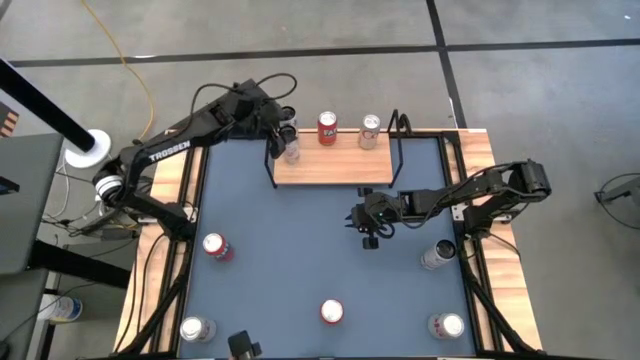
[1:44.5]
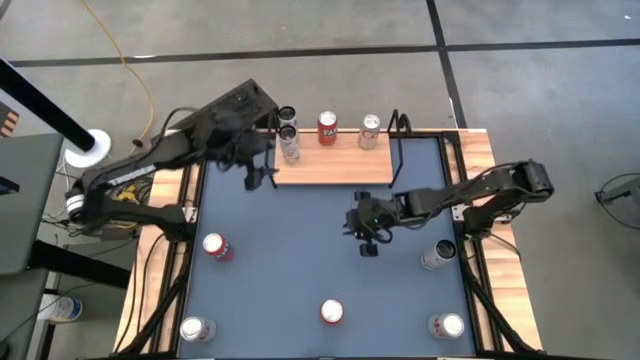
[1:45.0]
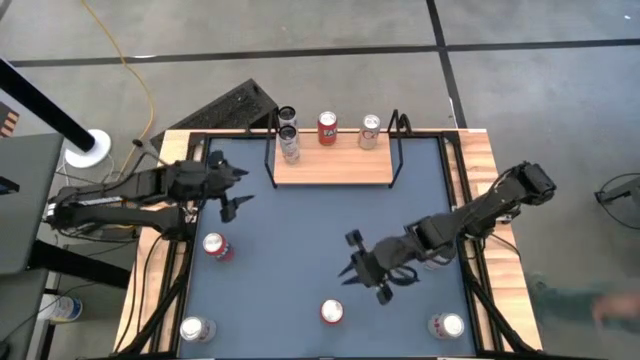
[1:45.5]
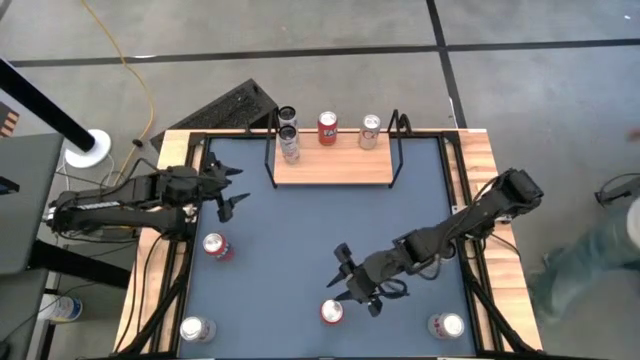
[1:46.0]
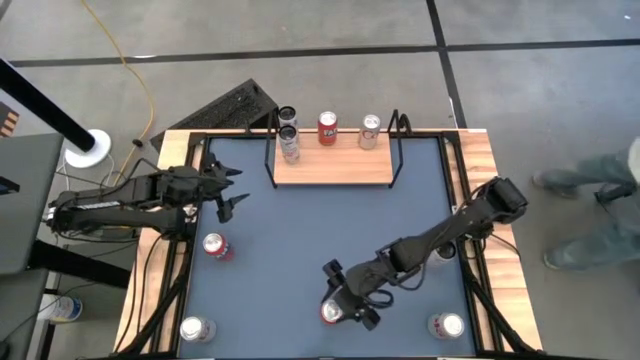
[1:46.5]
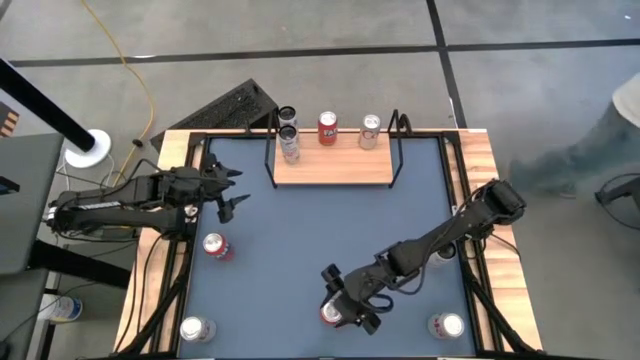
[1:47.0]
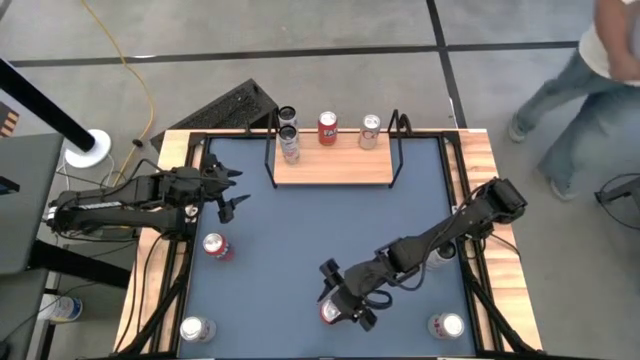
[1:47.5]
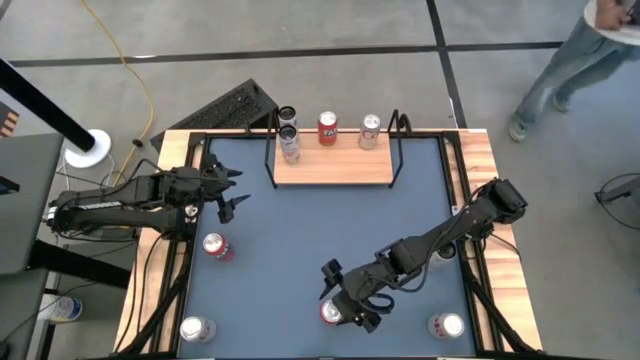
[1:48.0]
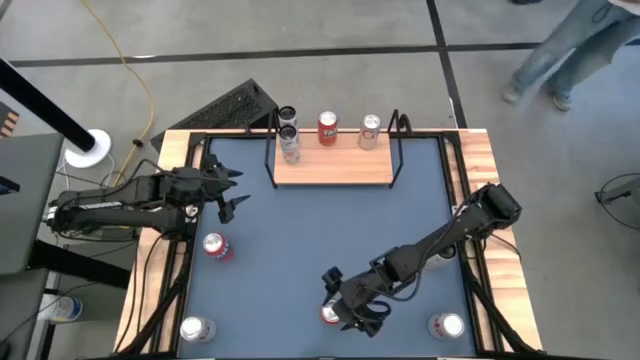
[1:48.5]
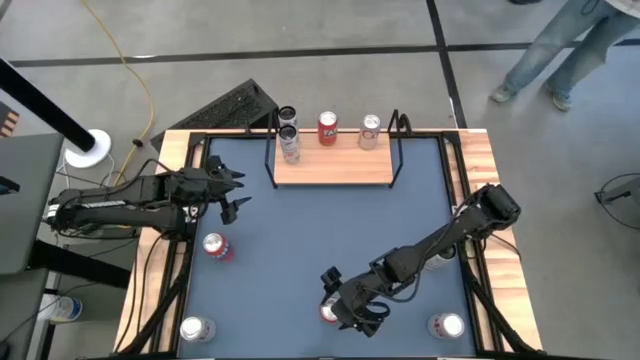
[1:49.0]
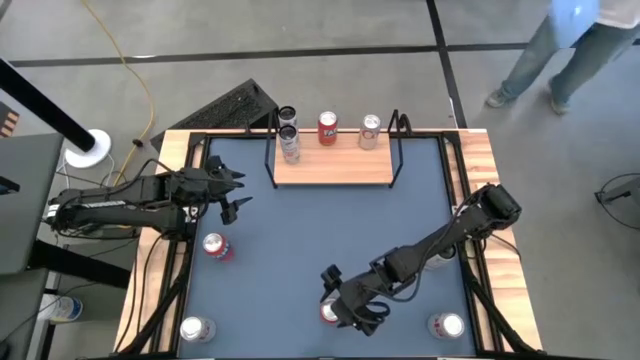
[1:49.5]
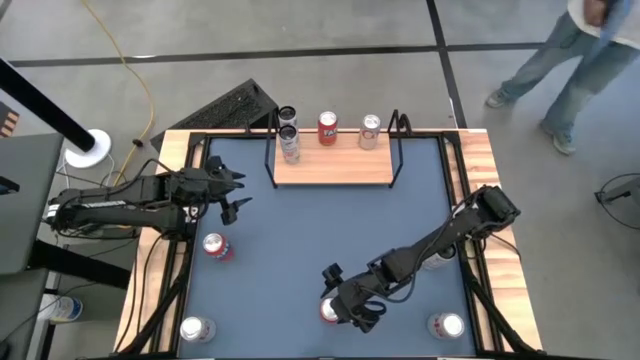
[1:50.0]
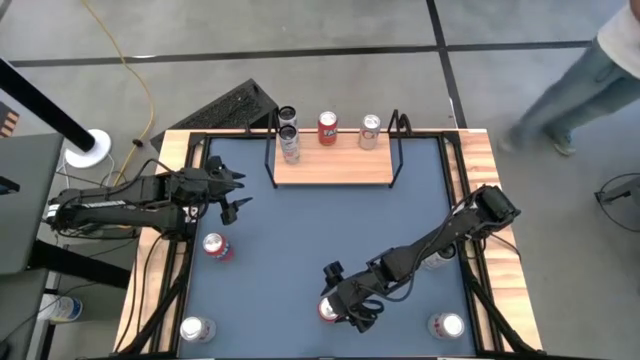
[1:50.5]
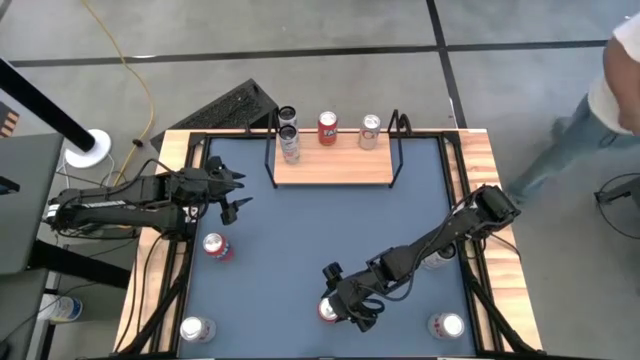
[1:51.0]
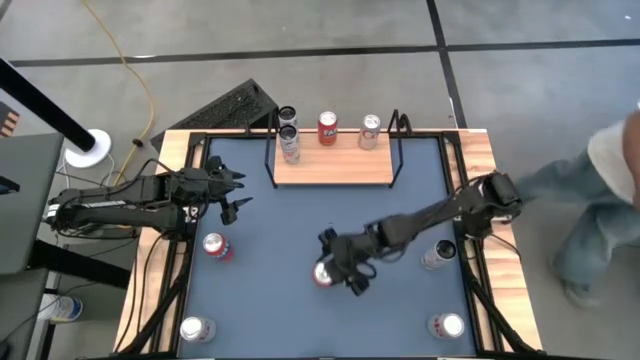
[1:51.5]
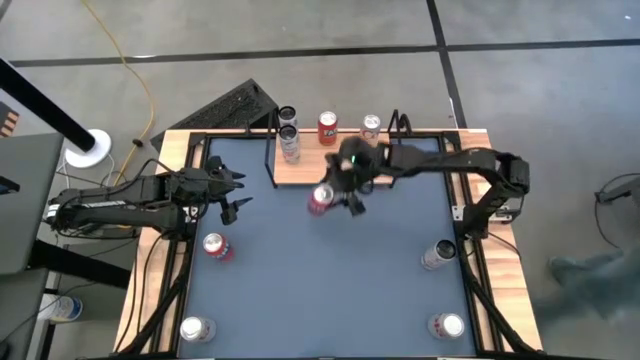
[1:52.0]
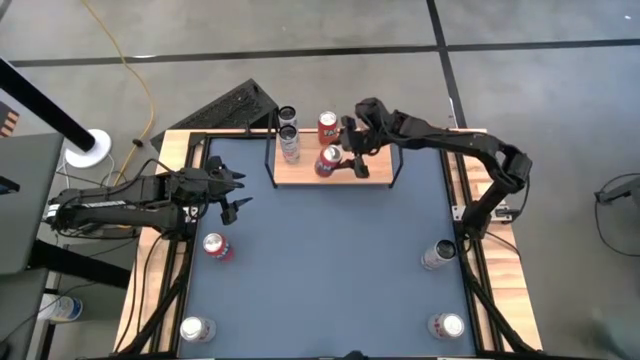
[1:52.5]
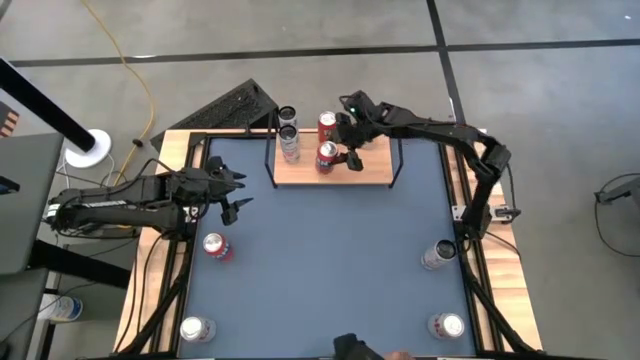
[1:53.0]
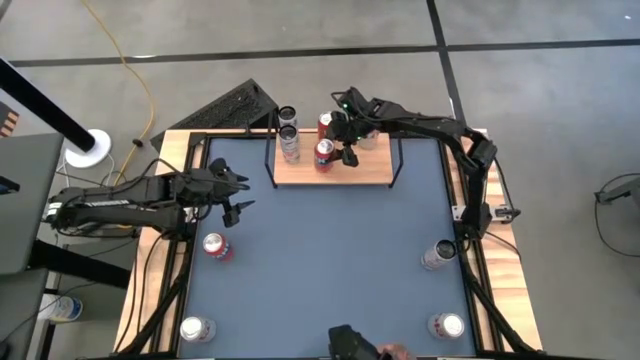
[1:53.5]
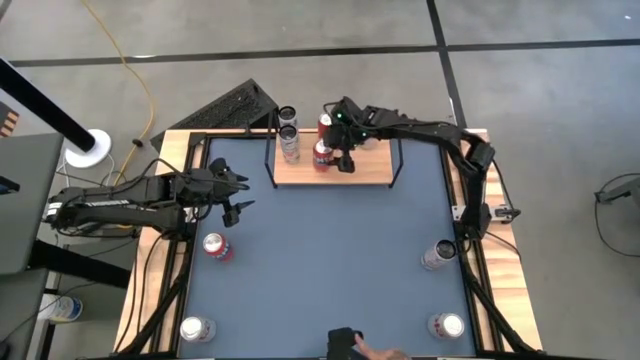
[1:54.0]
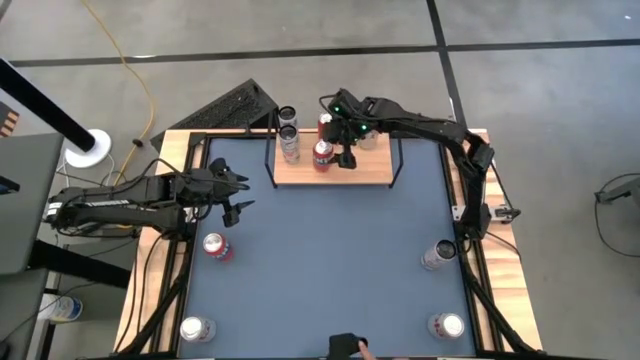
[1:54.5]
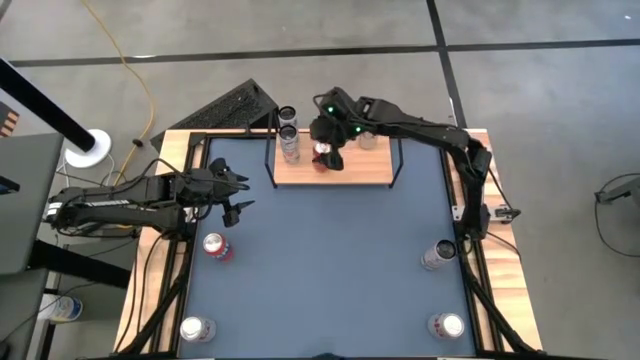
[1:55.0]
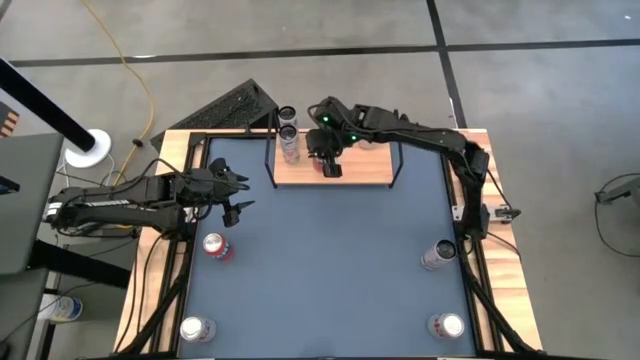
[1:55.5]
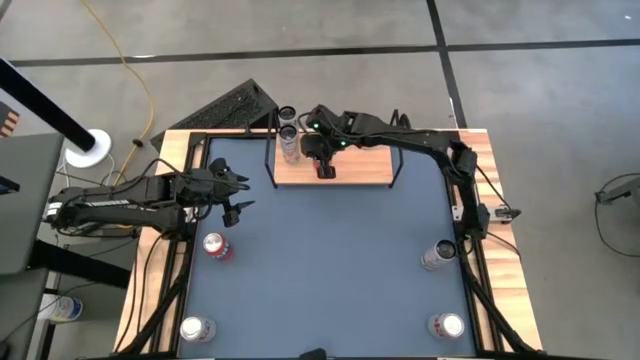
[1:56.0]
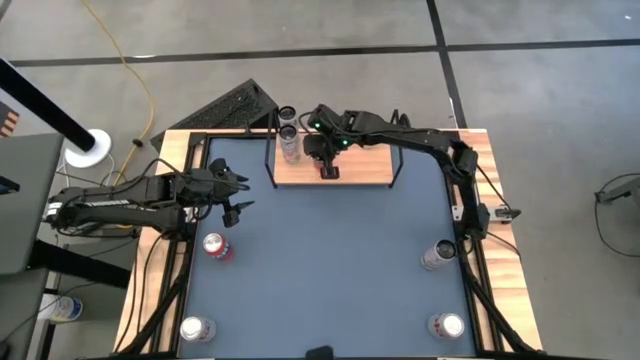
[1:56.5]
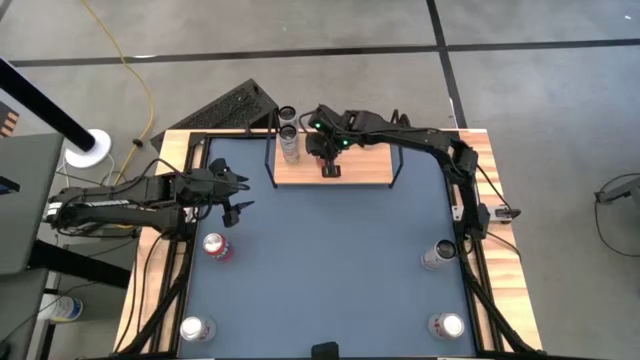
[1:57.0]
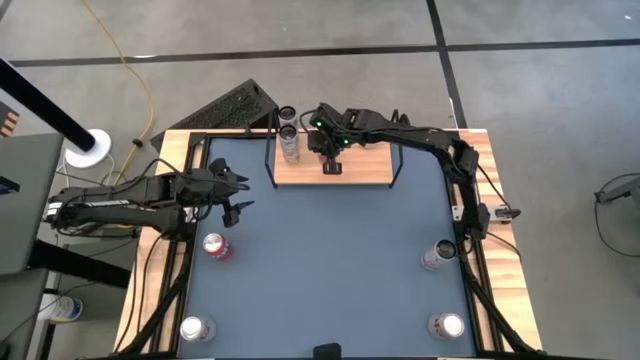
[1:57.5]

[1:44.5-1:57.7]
Task: Place canned beverage on shelf
Put the right red soda can on the shelf aligned with the other red soda can

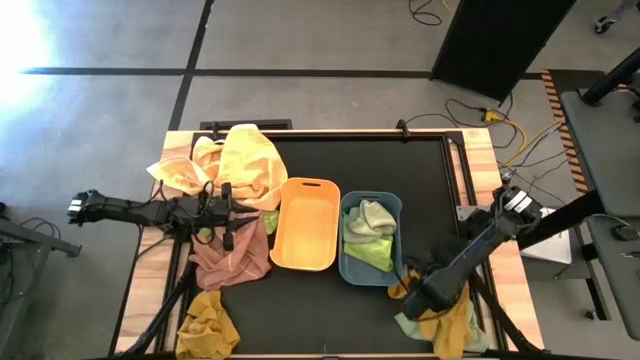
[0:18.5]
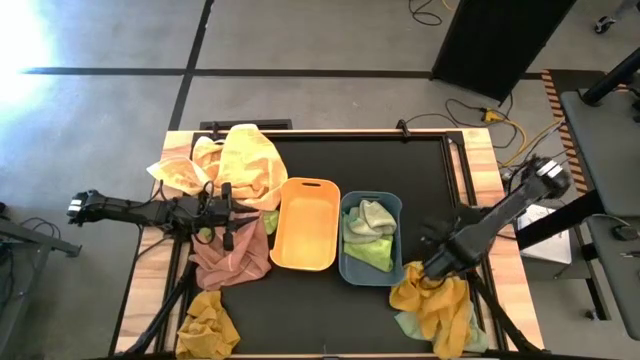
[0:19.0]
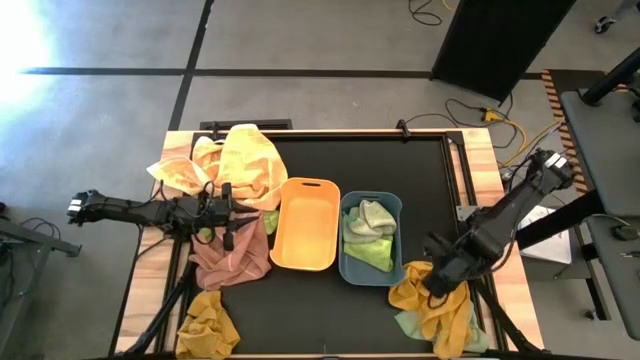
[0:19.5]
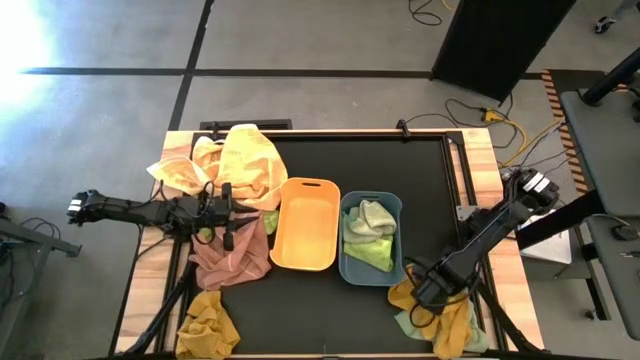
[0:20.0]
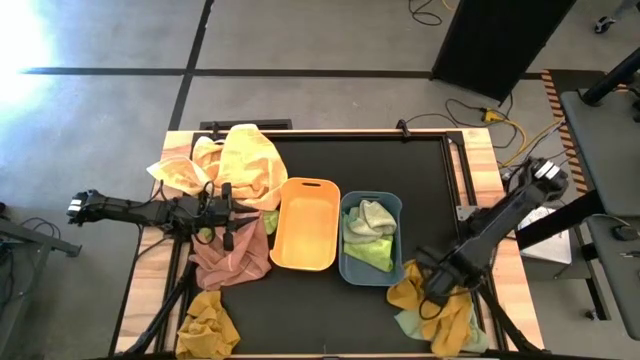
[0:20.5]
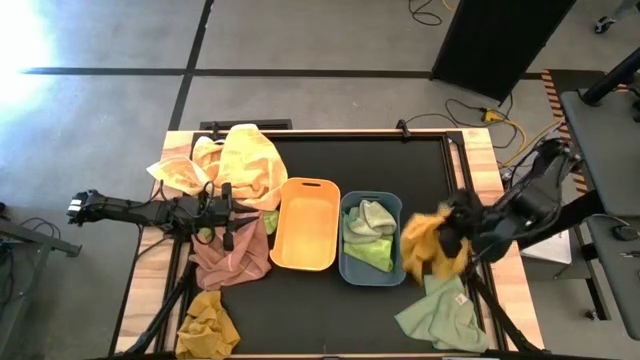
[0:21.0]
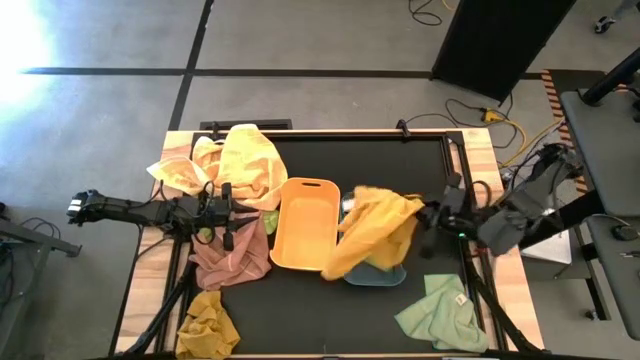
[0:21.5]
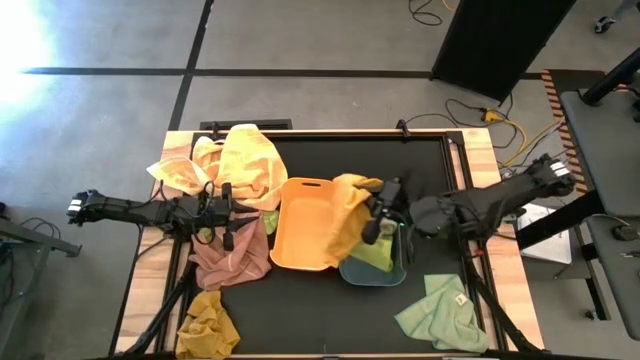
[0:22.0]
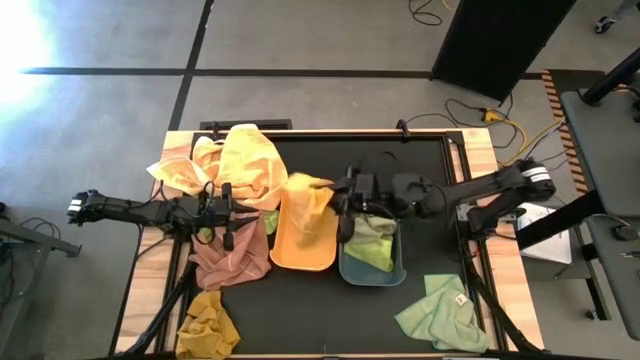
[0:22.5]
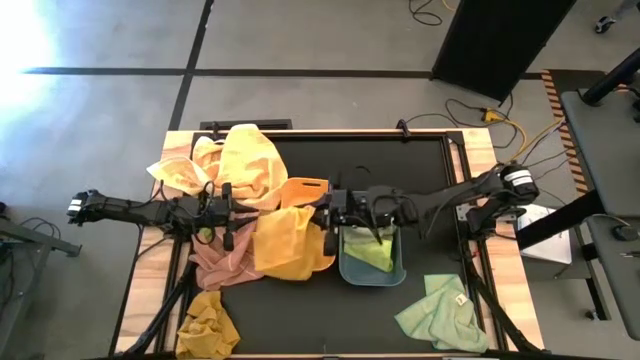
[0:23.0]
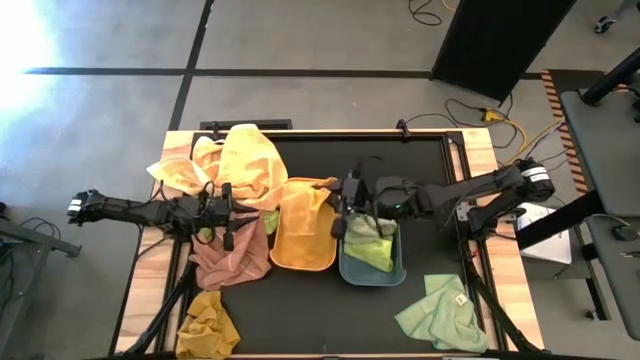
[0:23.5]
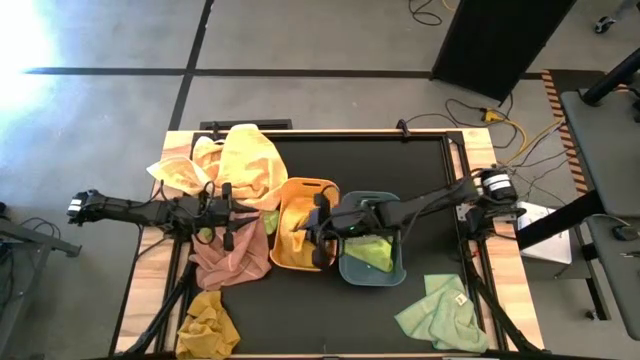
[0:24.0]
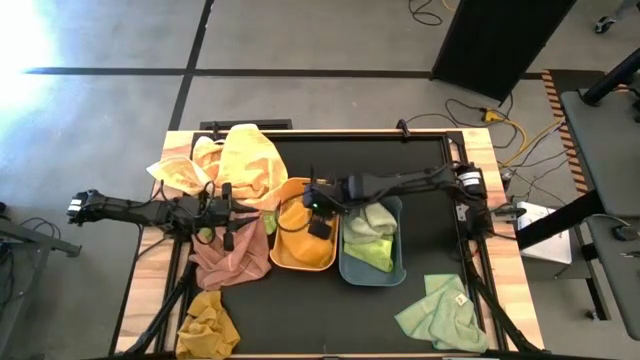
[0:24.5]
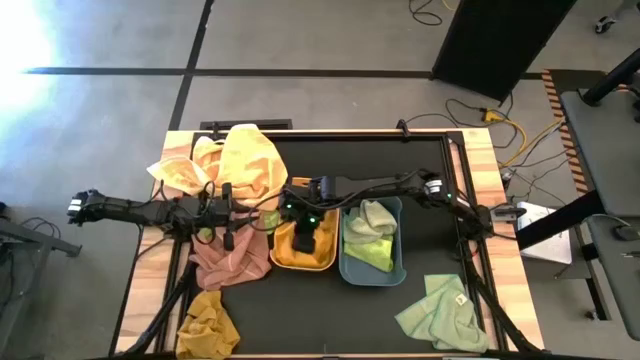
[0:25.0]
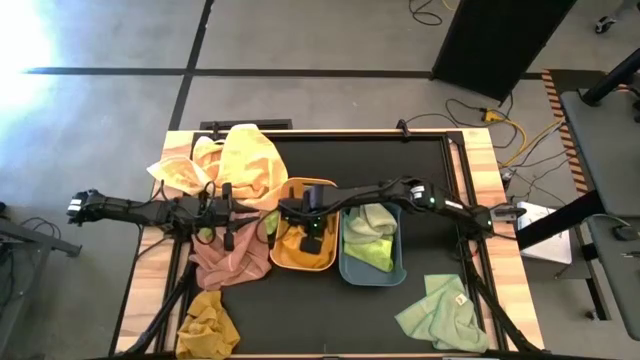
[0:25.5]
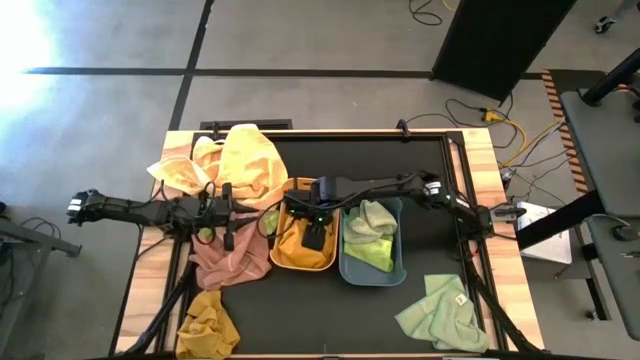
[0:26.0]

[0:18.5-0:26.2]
Task: Sort towels by color in basket
Put the orange towel into the orange bin
